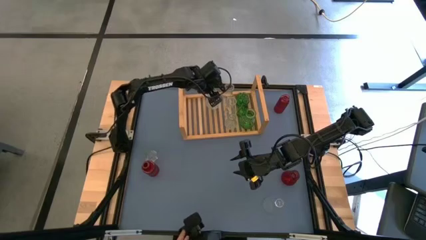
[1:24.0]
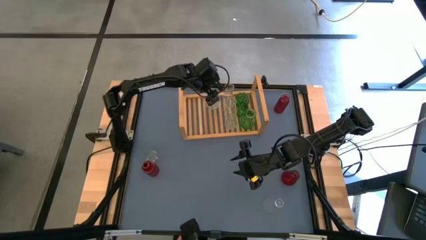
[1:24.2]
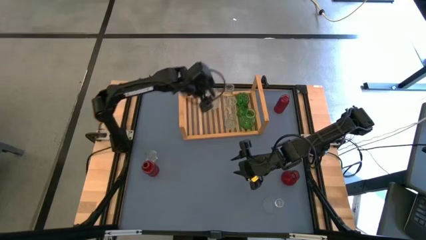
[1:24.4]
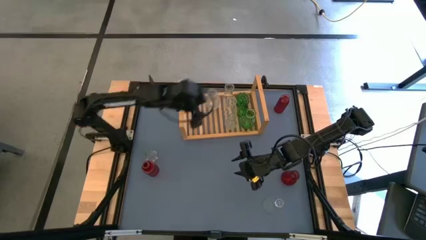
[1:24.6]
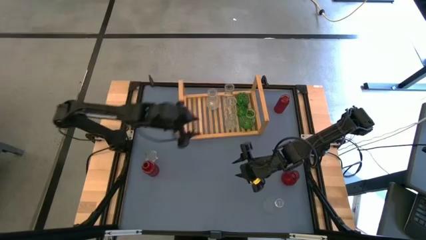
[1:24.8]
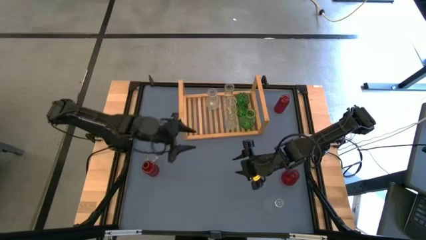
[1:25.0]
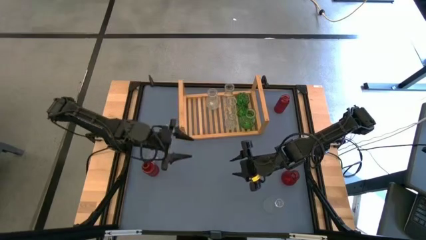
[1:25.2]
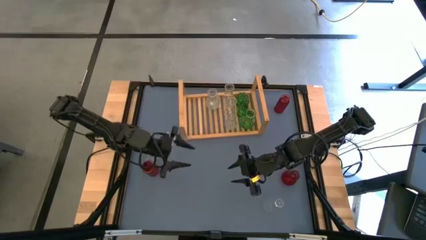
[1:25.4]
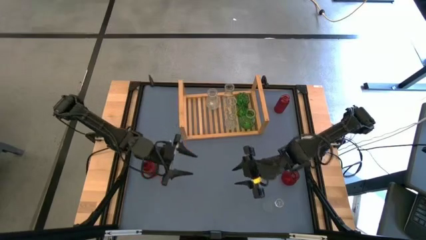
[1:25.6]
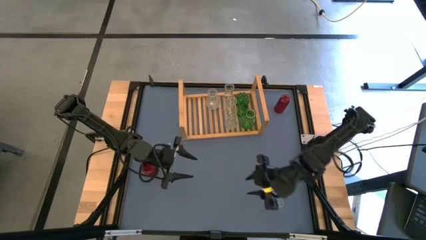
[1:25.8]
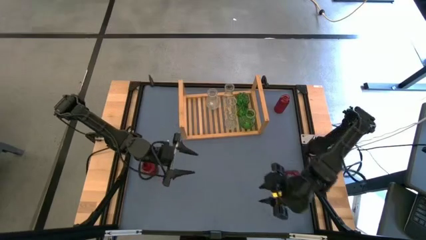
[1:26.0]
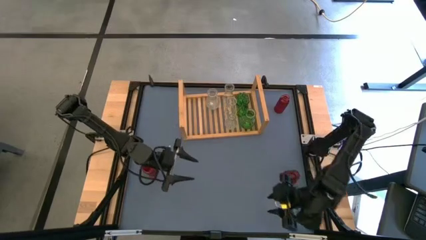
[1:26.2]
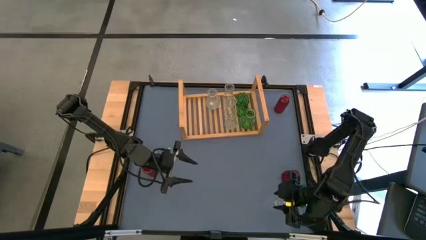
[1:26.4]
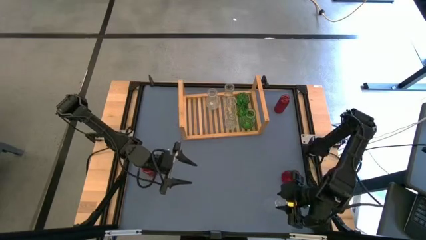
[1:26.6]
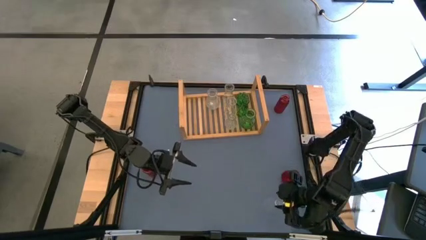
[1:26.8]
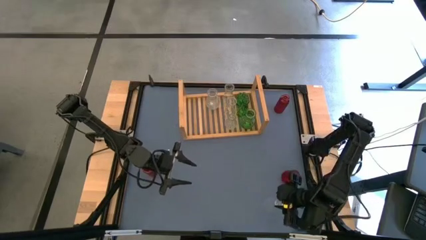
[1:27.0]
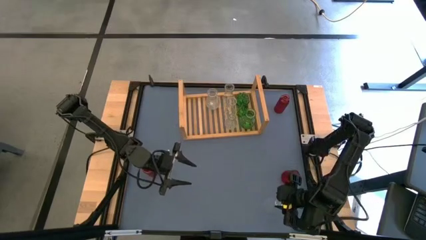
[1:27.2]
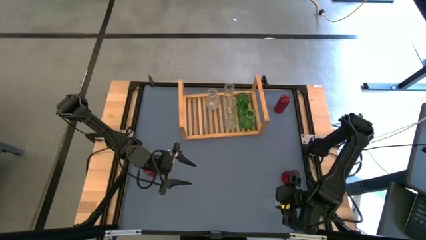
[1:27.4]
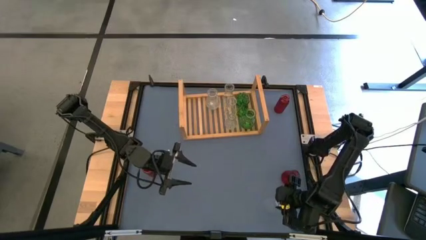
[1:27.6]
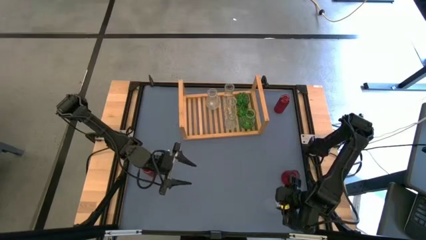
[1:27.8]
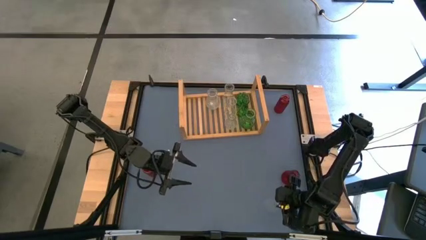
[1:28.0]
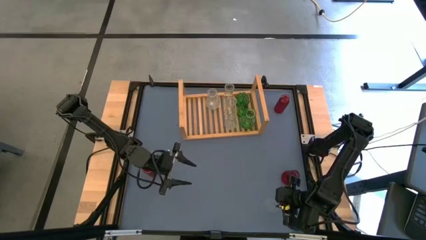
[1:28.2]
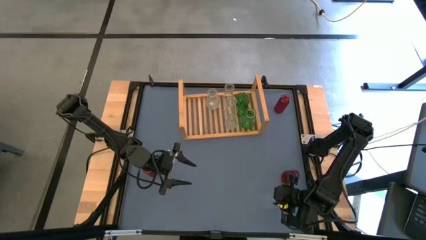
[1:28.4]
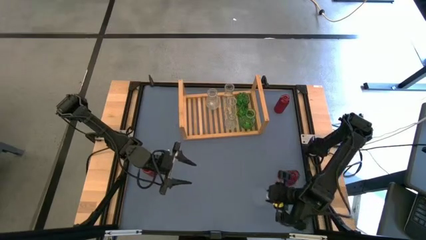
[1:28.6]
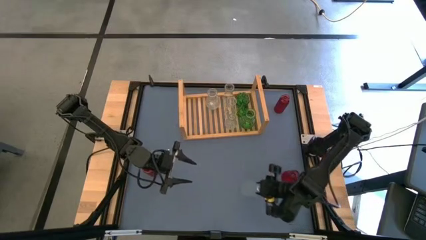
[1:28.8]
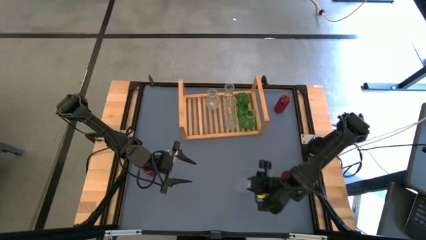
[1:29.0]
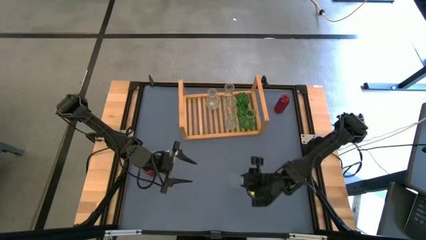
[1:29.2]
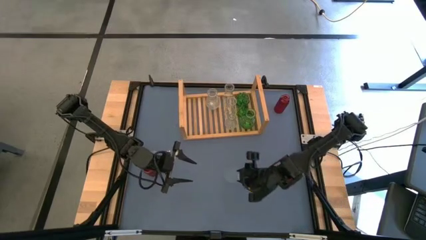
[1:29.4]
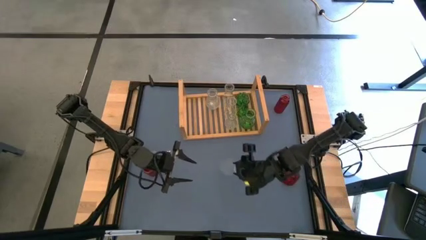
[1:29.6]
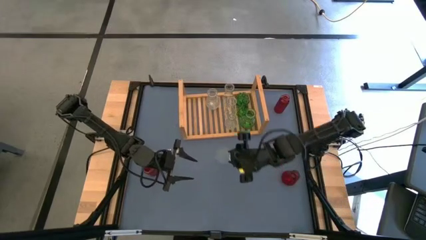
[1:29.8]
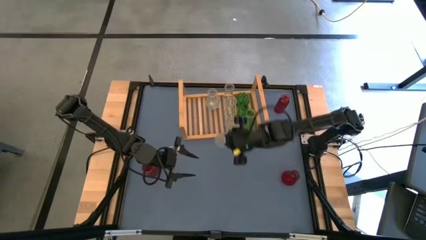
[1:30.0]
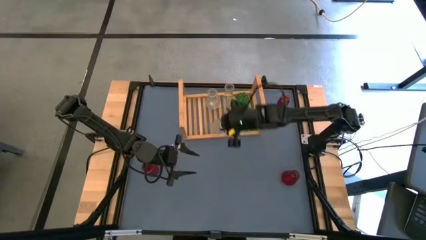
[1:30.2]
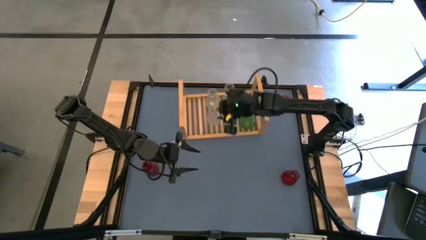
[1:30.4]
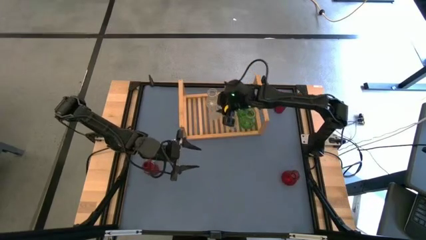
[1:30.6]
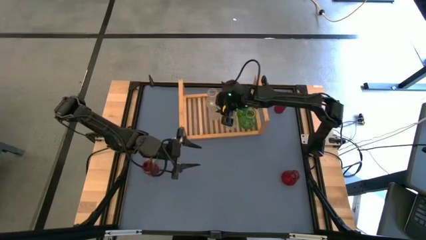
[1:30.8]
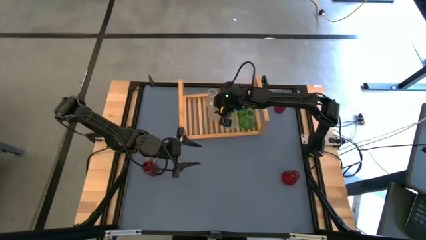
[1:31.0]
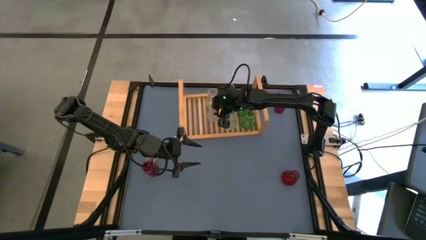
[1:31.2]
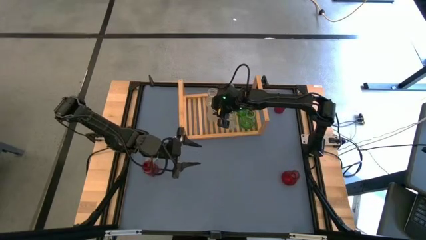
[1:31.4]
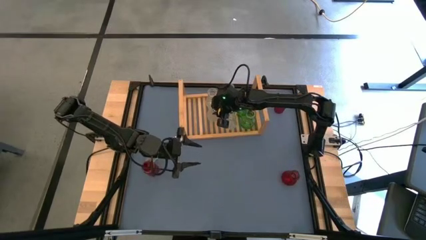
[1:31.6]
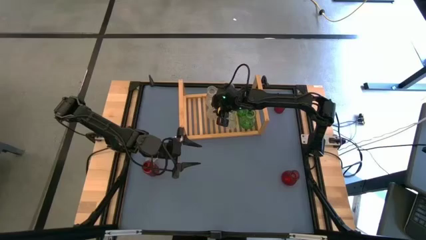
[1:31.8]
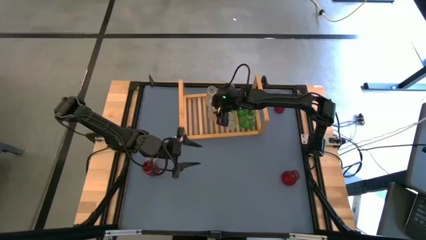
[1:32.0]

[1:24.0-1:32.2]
Task: sort vases onto shelf
Put the transparent vase on the shelf aligned with the other transparent vase

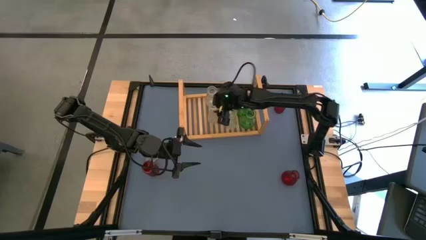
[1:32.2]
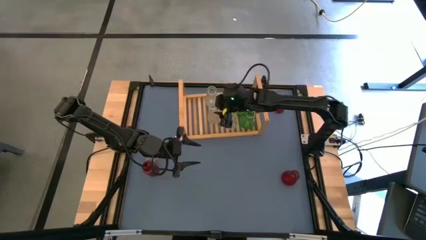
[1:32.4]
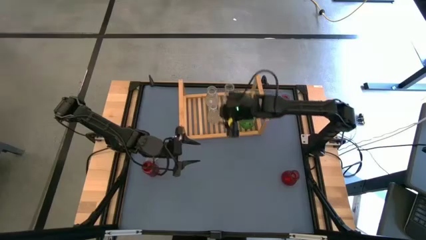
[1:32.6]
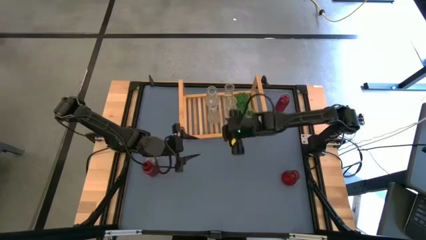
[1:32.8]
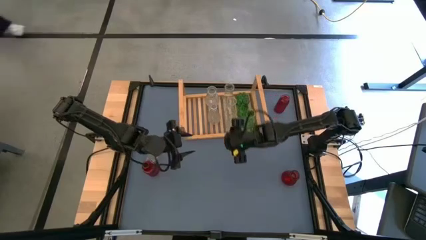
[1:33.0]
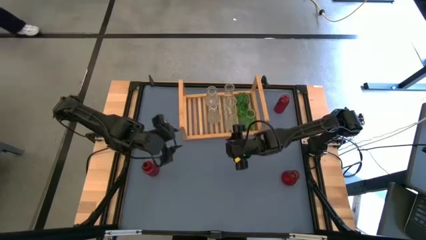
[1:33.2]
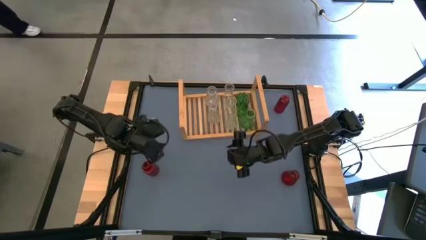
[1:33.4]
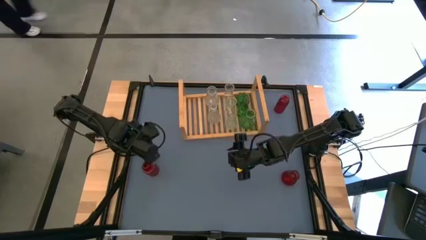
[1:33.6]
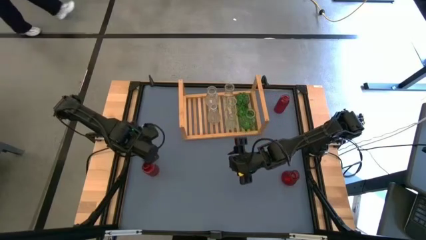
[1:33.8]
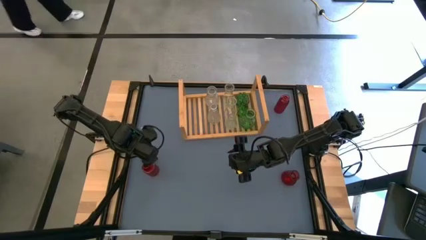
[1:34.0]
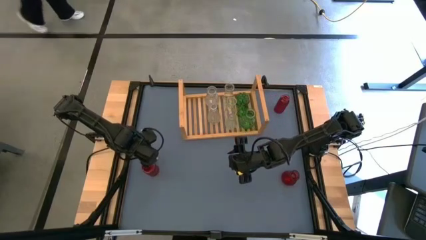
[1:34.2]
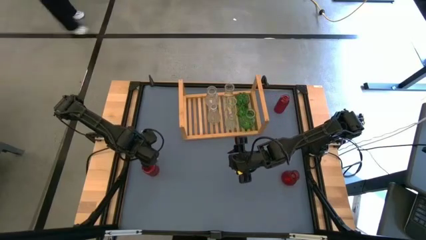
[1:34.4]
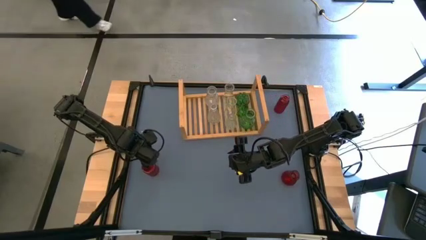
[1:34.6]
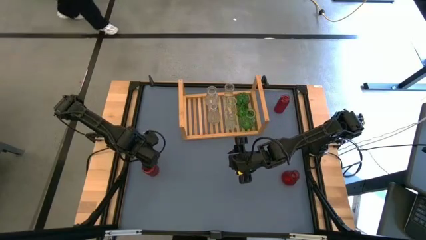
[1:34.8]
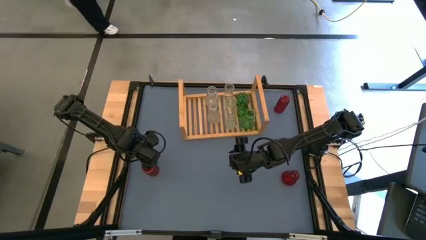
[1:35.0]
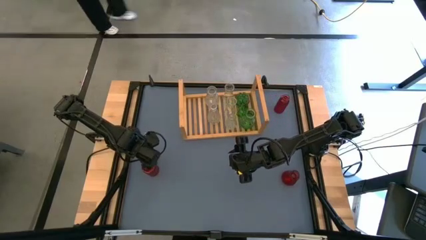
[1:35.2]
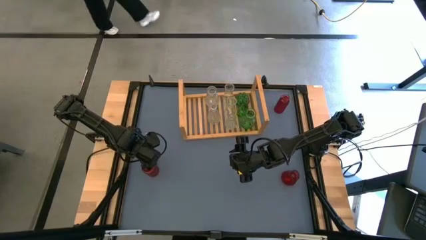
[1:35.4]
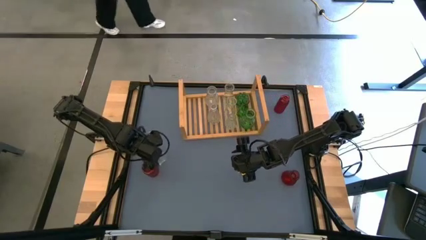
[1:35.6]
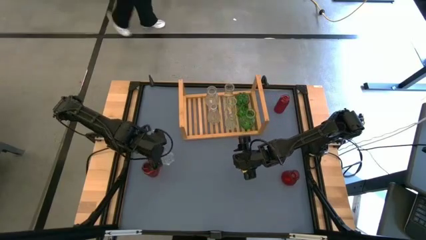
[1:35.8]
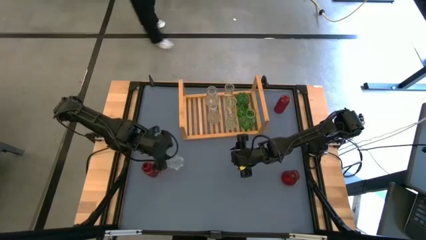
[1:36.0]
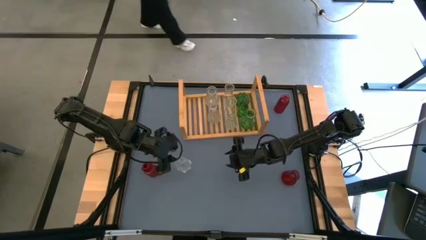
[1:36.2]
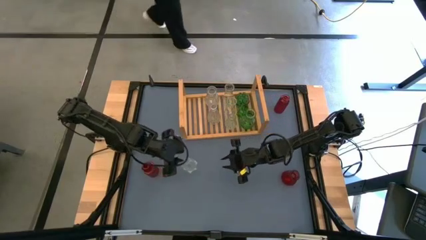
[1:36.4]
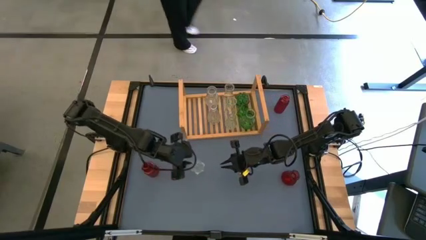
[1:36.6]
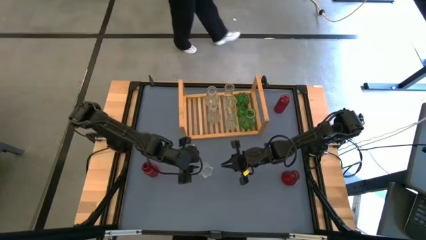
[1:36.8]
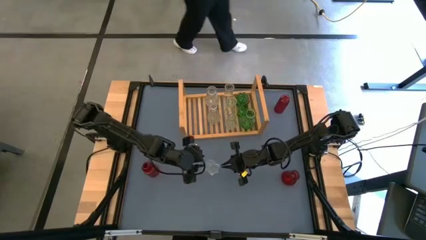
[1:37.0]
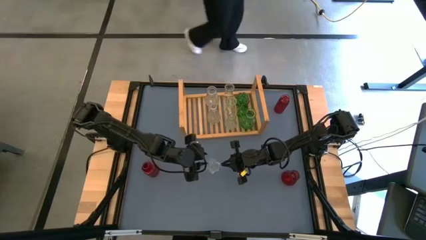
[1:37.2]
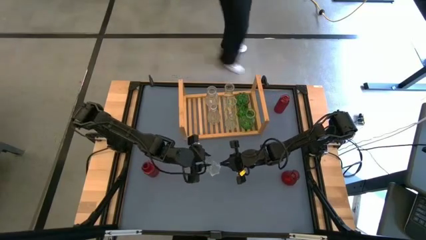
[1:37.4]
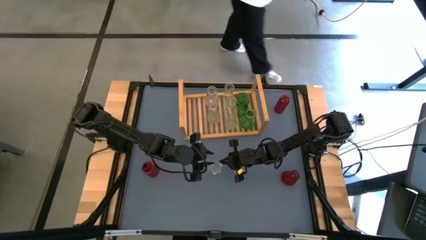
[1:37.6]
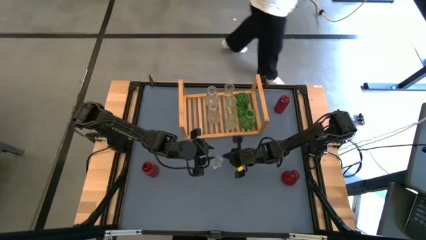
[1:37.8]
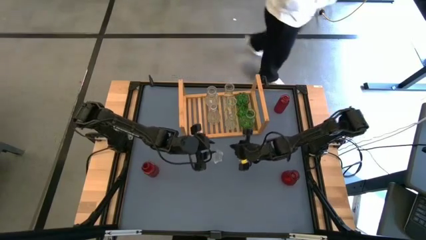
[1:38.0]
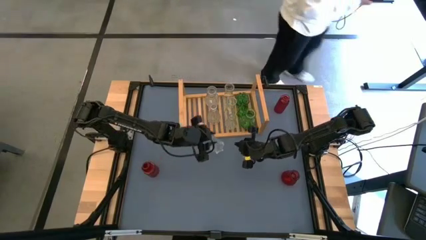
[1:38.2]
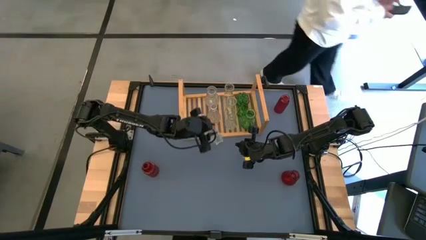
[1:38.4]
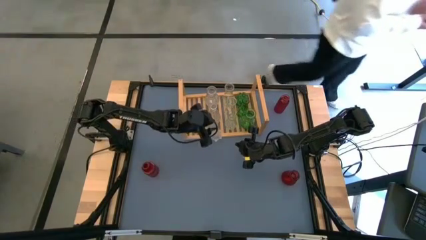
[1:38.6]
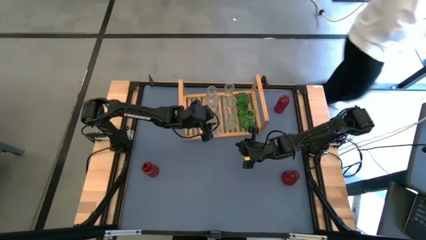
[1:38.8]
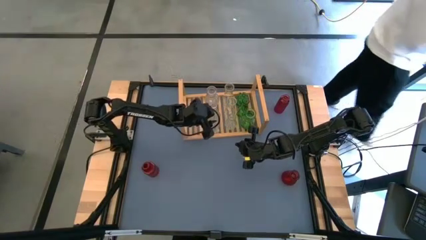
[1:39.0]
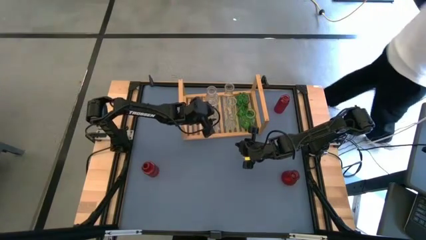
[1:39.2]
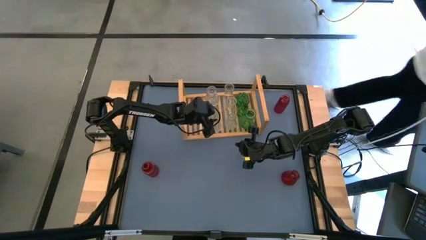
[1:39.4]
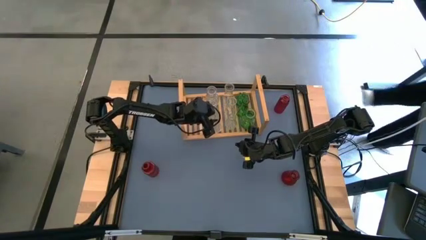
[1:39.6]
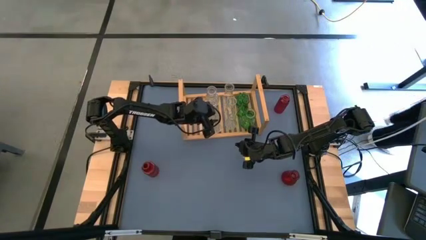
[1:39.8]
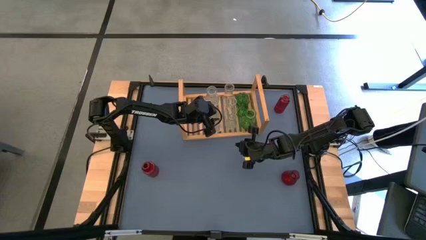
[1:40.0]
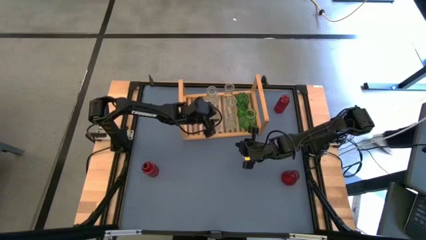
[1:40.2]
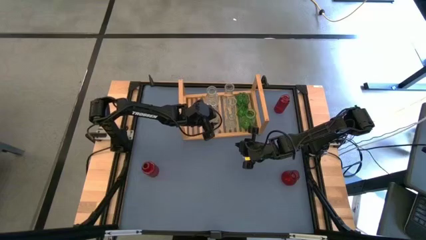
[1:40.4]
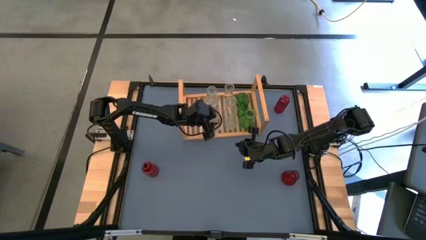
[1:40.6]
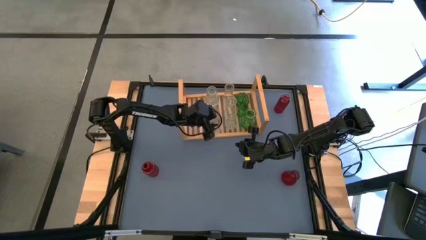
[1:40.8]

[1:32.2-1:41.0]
Put the transparent vase on the shelf aligned with the other transparent vase
